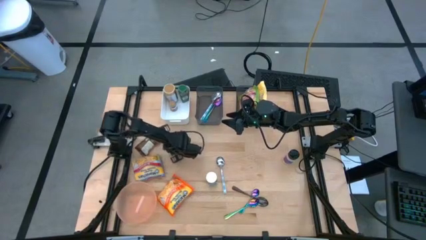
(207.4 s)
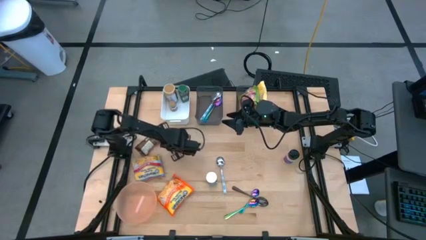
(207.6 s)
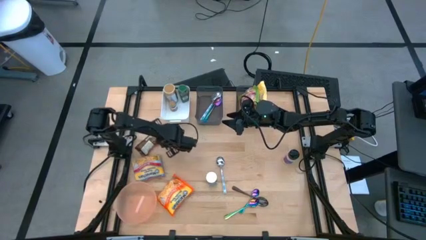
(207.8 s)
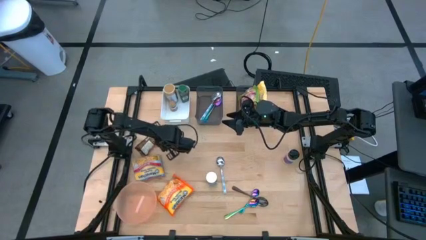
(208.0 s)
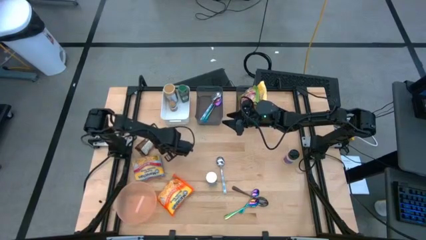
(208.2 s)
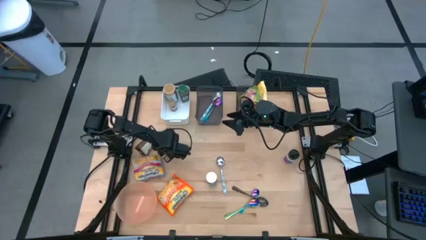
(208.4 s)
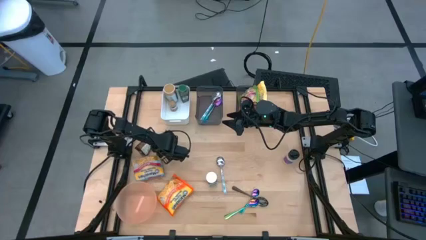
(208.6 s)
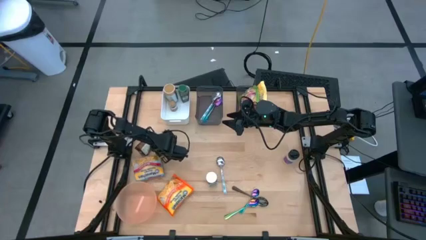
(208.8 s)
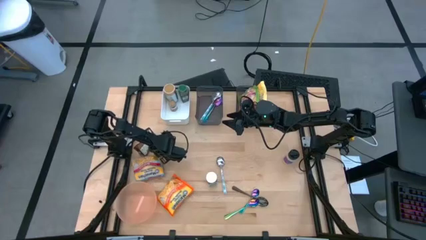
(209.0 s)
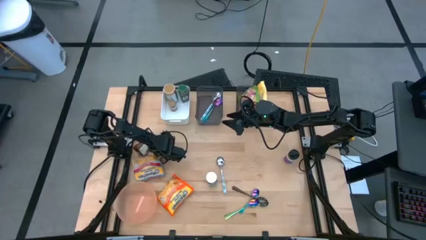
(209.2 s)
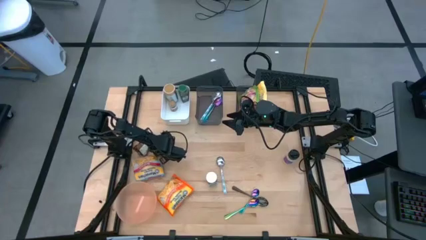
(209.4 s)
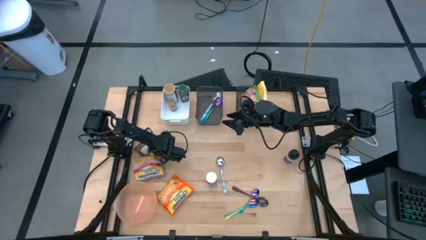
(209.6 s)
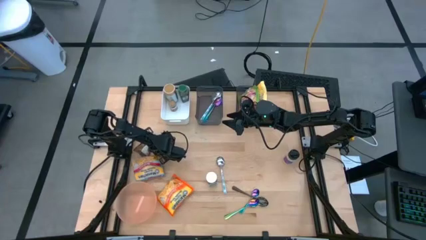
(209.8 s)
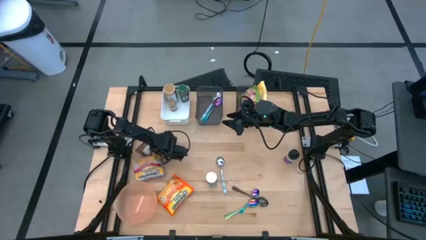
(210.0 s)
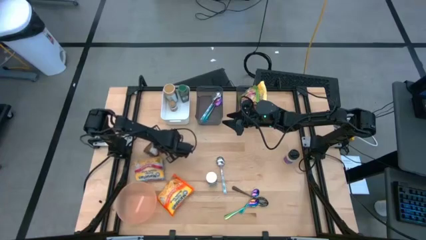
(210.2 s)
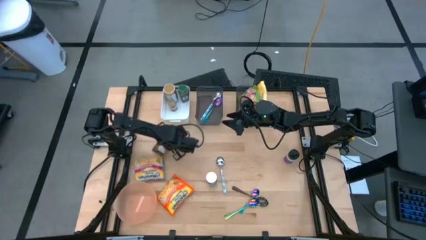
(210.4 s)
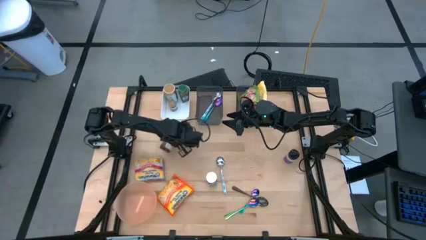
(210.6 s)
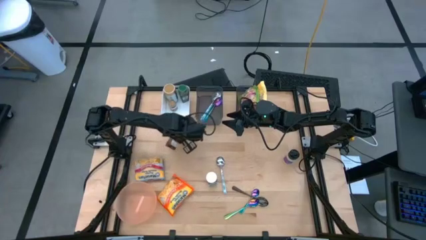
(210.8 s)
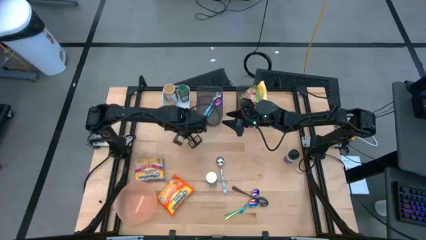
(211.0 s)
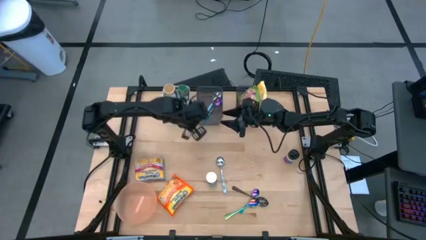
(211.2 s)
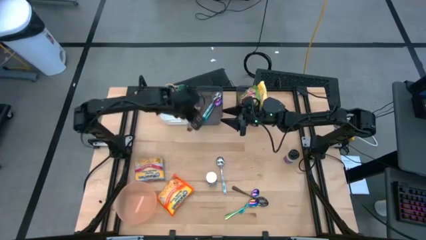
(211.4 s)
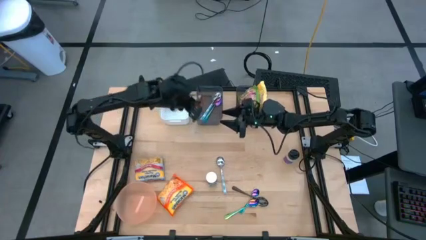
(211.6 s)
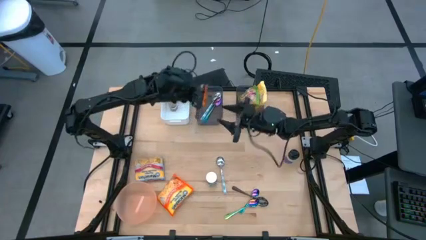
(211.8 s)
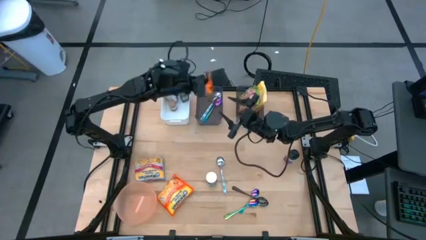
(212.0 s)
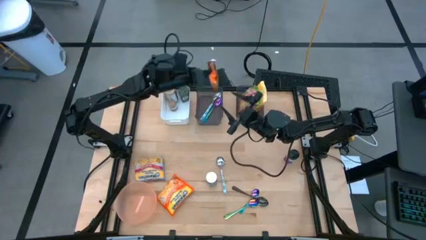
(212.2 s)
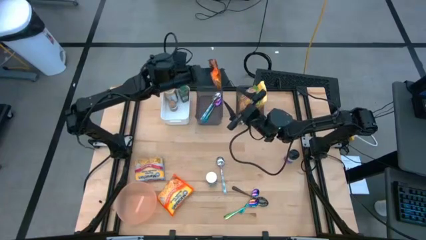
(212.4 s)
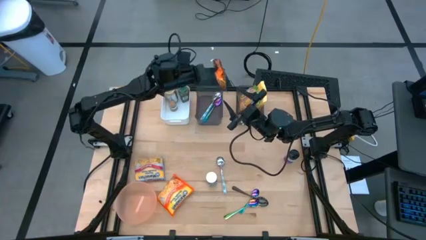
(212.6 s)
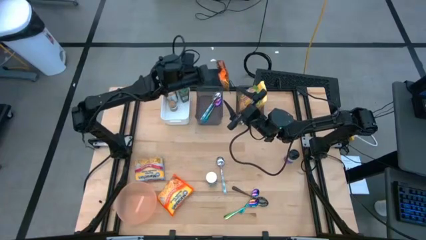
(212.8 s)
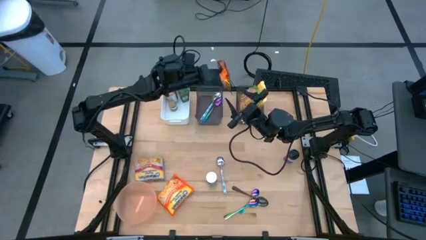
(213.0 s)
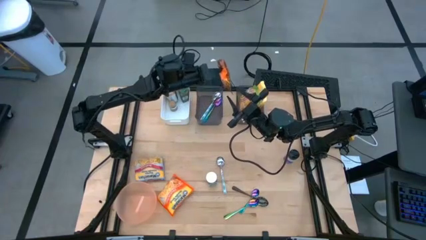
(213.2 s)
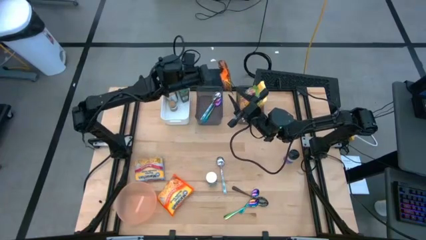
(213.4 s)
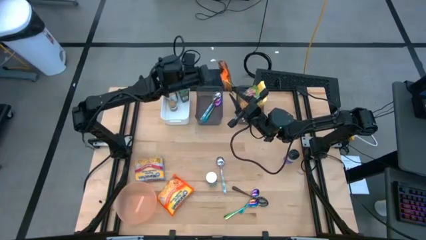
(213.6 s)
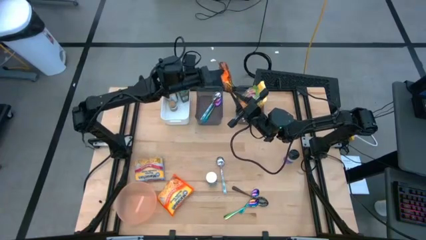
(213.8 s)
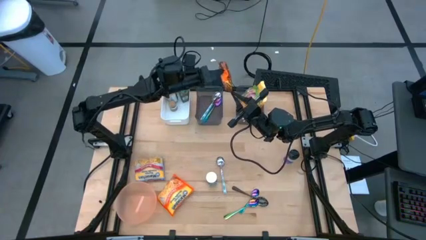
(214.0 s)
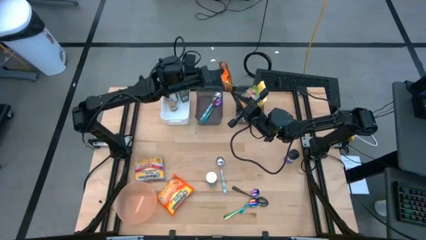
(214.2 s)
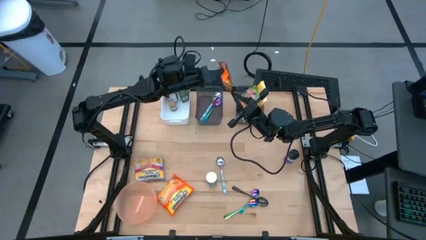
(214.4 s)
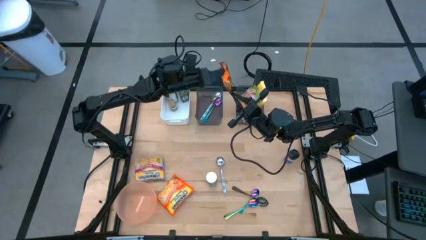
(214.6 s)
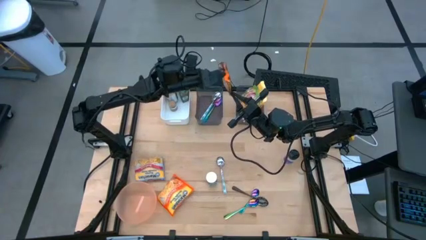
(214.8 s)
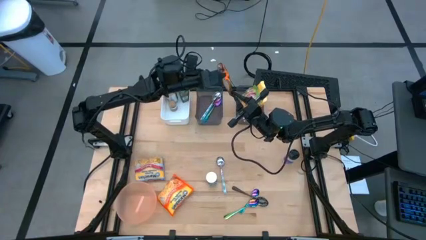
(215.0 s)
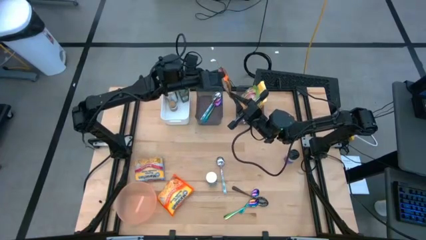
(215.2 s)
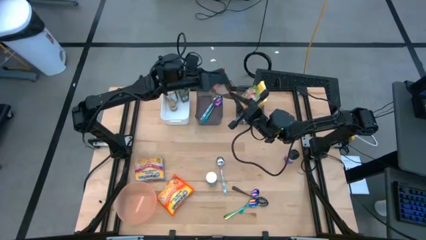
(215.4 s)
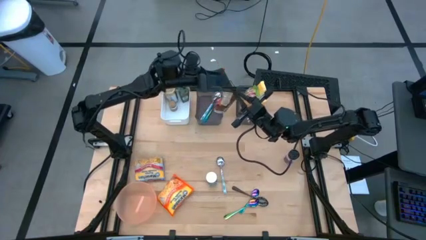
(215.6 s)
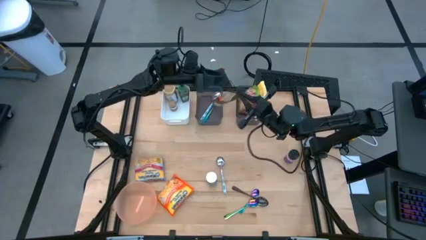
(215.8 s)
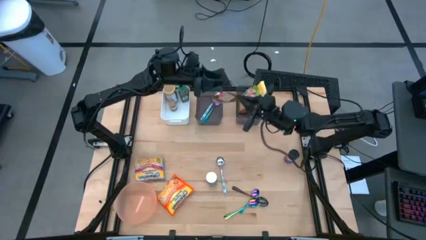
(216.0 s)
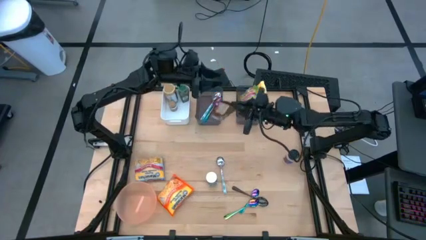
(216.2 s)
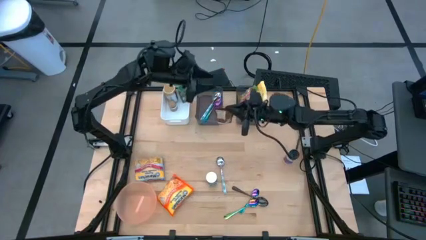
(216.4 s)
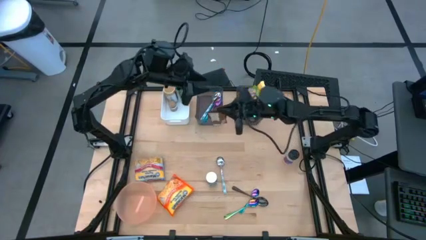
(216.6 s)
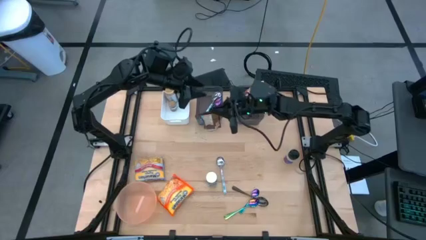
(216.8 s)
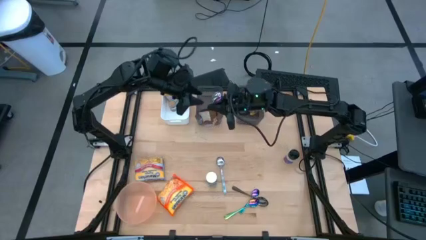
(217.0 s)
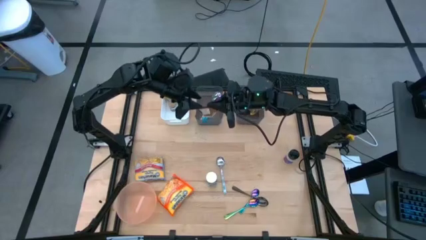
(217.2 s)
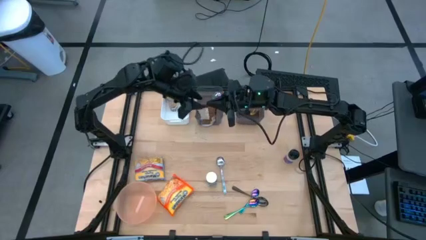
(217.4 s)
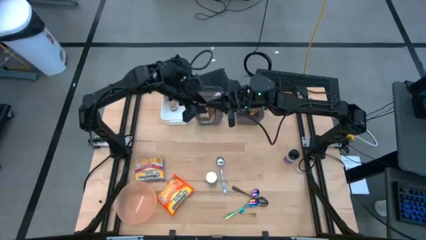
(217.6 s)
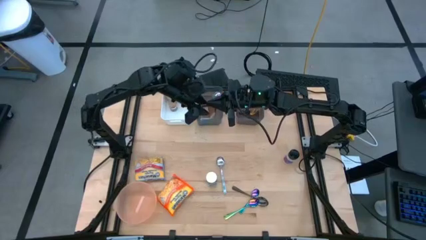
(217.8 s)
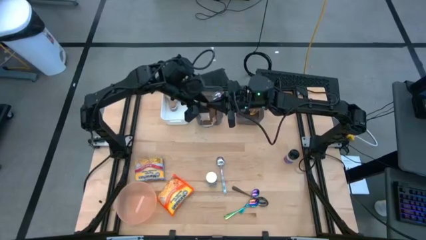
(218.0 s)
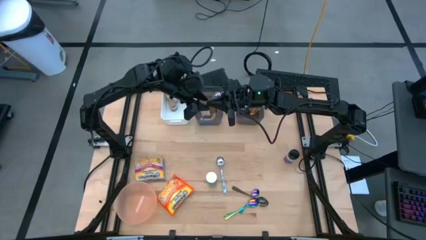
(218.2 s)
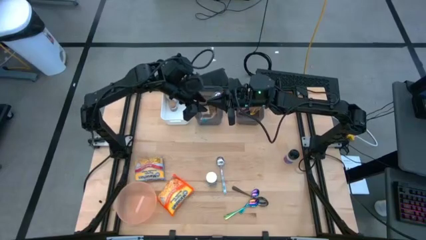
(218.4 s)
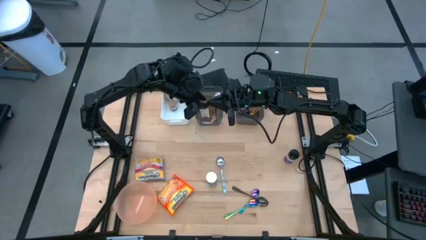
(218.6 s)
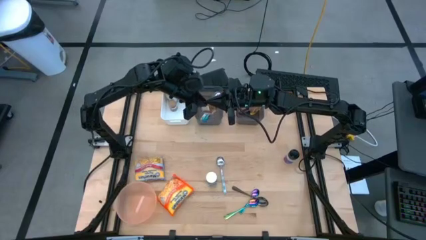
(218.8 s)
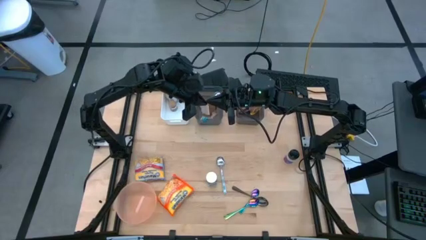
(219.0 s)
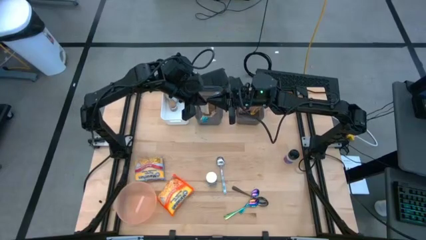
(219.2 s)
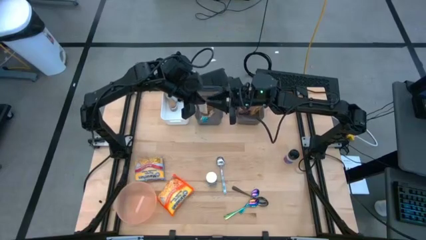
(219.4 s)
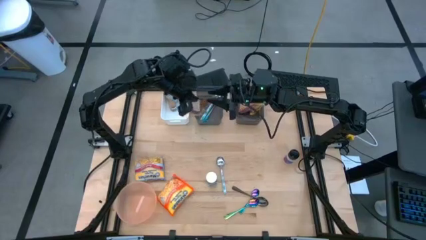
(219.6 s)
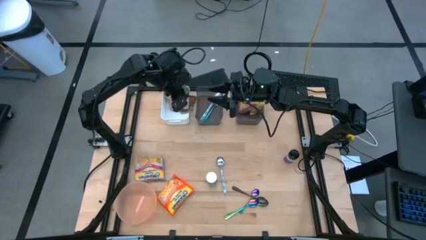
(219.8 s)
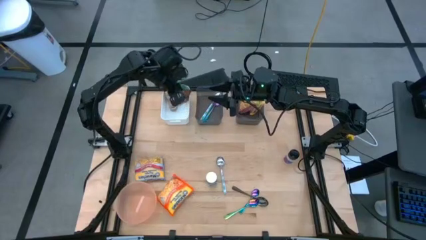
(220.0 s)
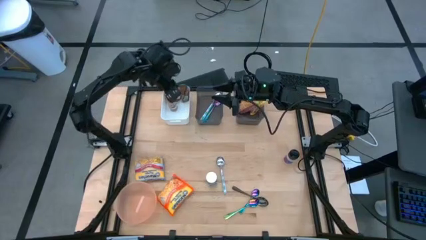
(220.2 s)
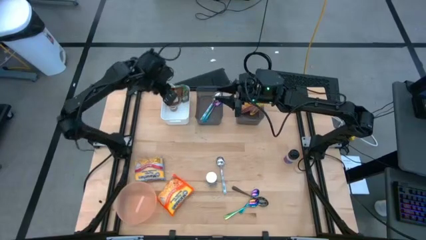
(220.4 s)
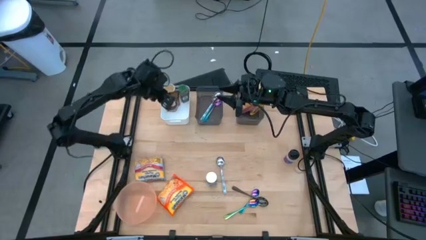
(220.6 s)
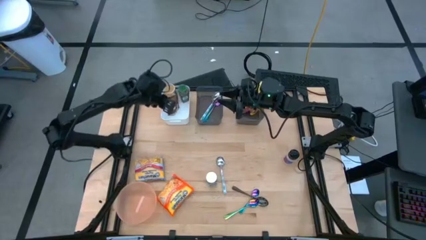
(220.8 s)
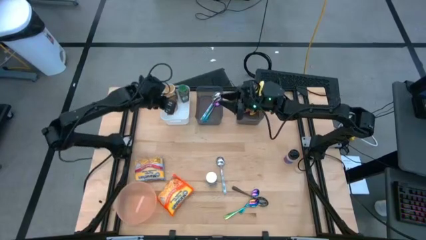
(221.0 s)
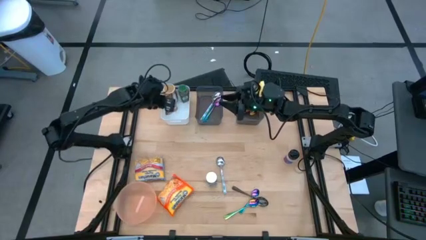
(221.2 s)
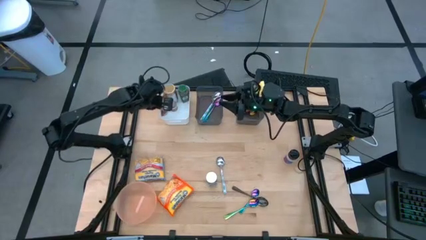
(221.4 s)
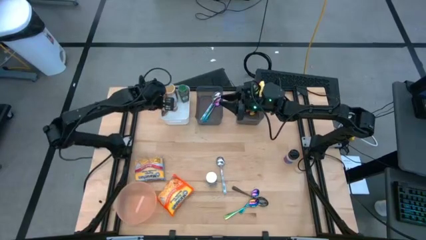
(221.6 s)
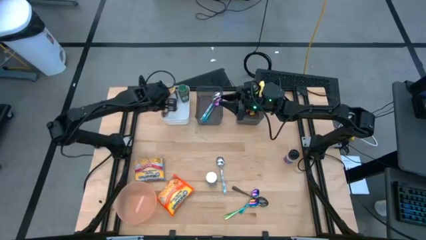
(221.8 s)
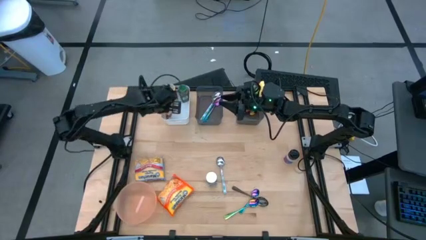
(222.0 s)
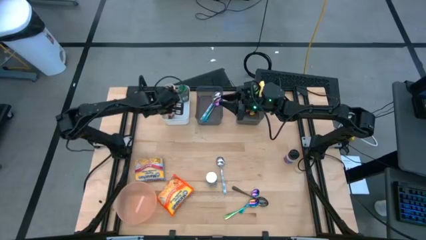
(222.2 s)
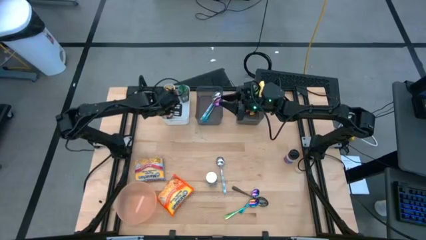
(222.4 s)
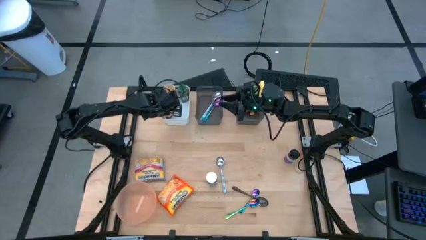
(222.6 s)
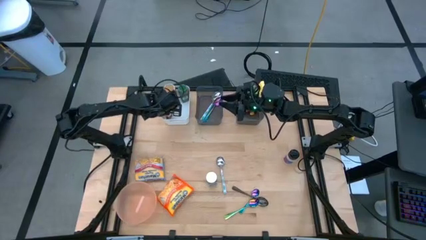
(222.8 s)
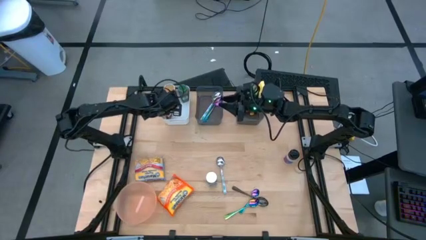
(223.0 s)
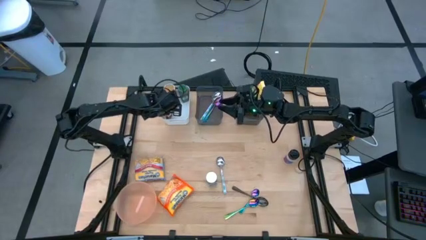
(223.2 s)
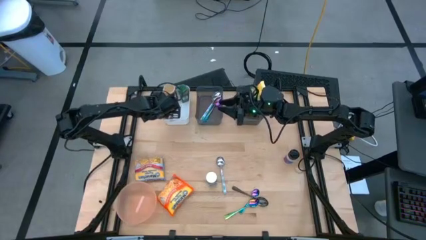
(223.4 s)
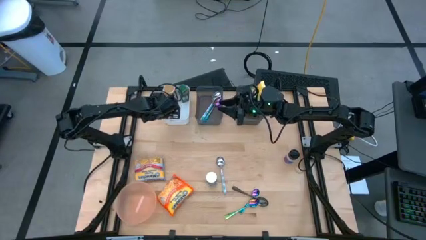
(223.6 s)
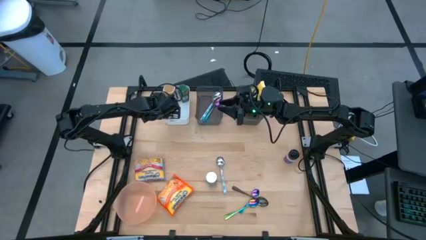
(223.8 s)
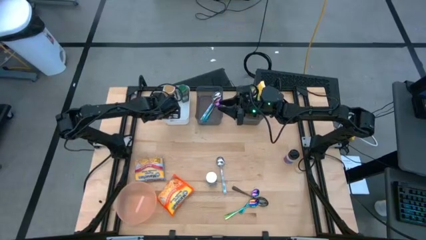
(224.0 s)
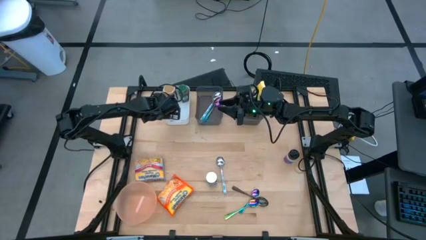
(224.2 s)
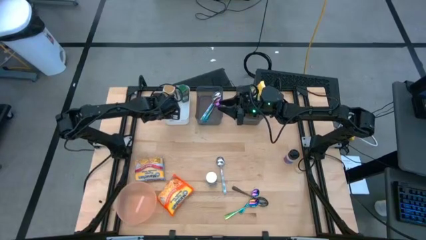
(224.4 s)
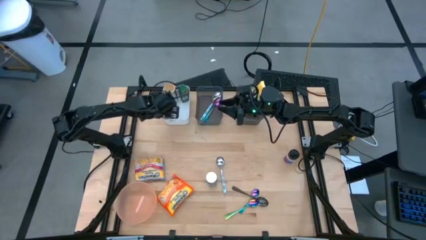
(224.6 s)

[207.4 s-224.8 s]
Task: Pick & Place Food Item
Put the orange seasoning bag into the white bin
